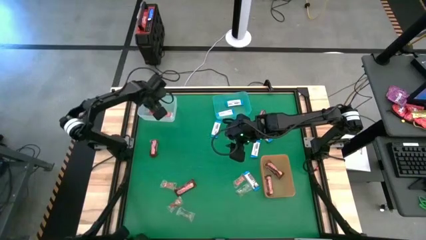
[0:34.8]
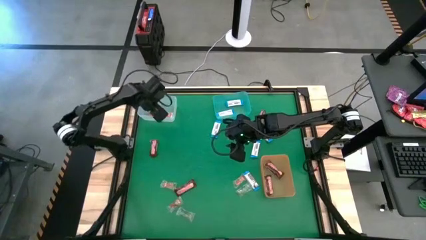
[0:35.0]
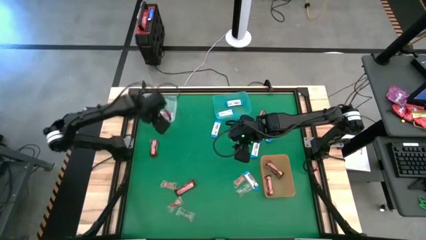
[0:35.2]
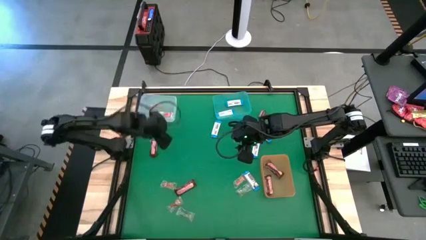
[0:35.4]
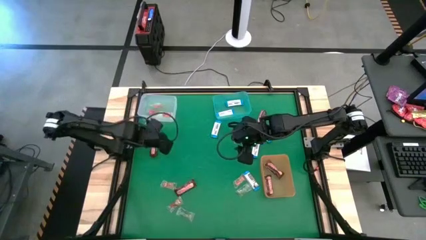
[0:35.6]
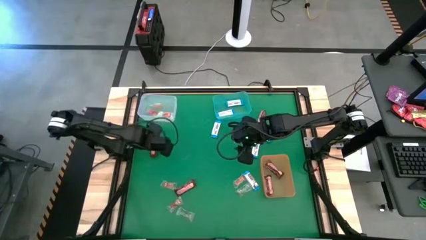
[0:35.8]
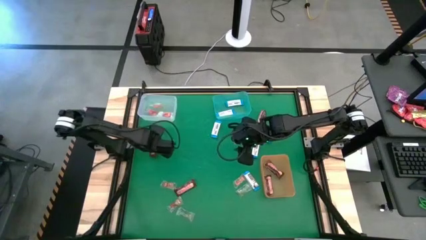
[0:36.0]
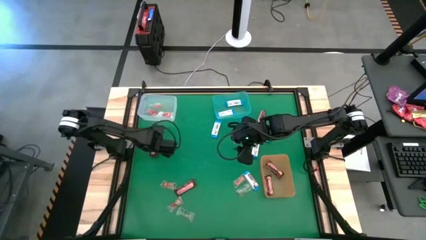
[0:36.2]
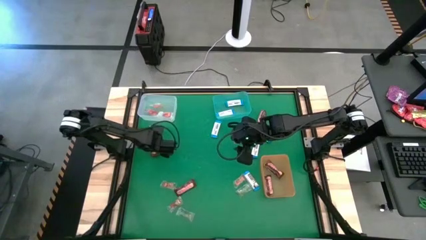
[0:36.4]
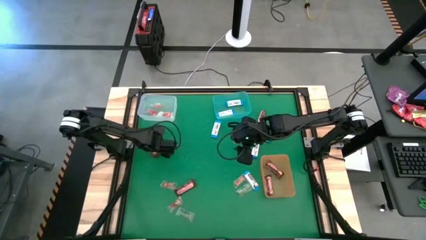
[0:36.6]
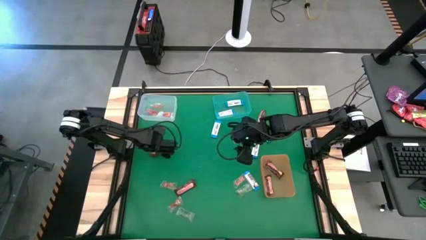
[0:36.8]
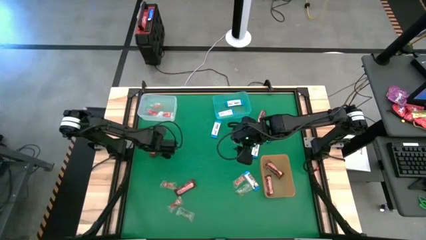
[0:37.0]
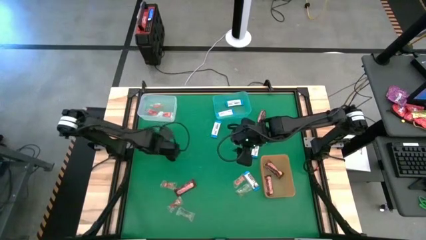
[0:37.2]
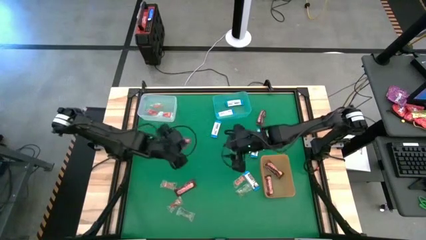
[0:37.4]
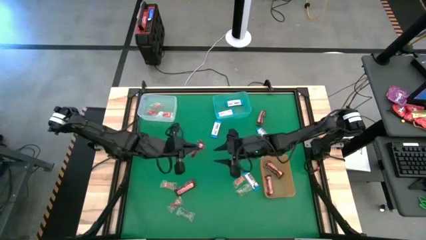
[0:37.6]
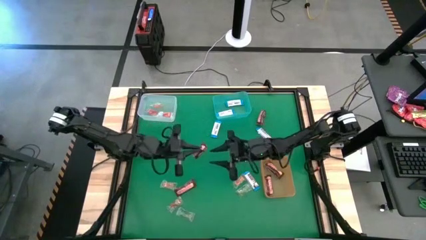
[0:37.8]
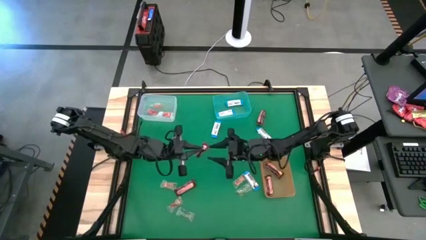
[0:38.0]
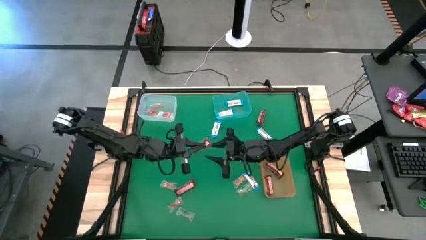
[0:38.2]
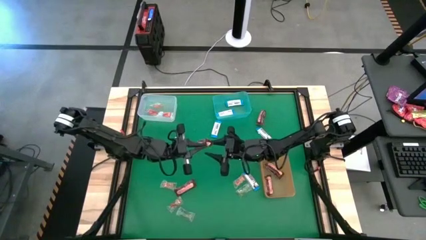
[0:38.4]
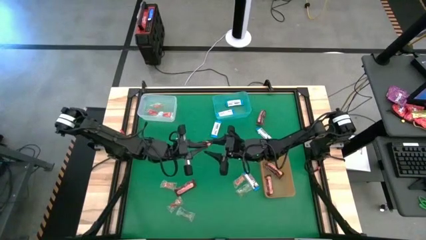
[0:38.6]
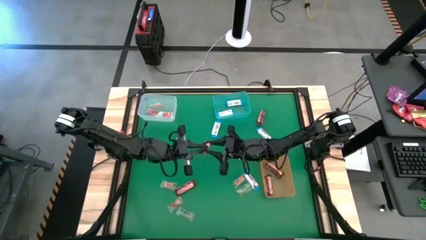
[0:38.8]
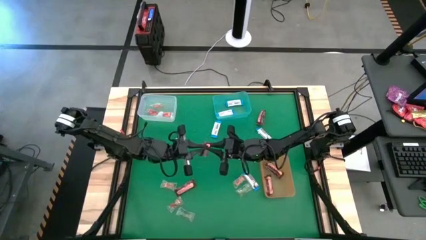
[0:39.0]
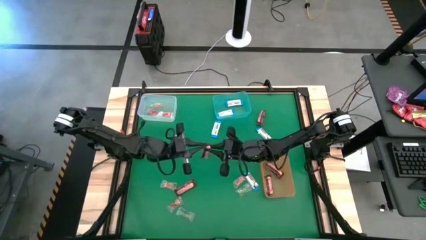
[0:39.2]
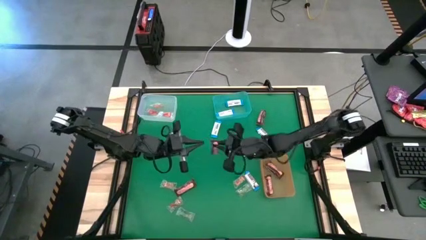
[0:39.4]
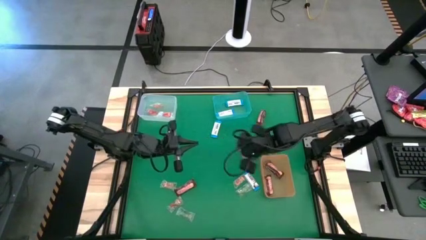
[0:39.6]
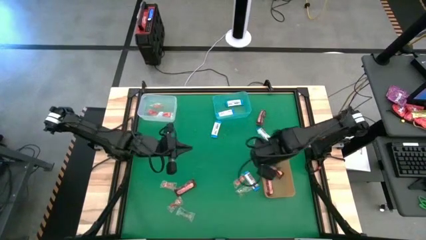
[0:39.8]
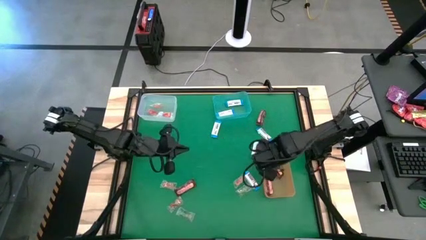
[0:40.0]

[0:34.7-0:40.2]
Task: Sort candy by brand, put in halloween buckets
Put the brown chocolate into the orange bin

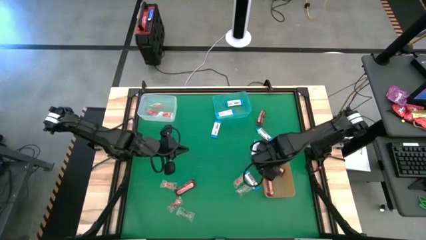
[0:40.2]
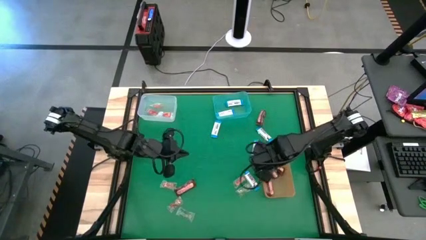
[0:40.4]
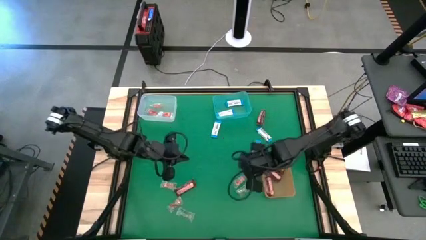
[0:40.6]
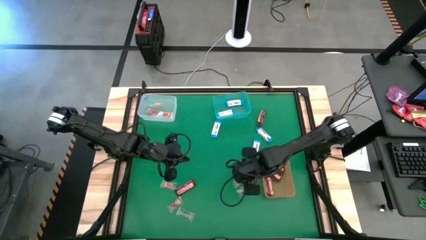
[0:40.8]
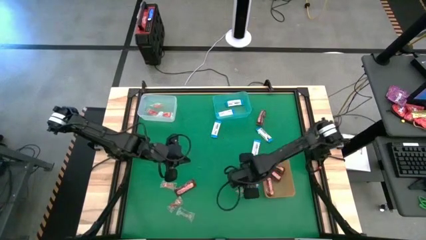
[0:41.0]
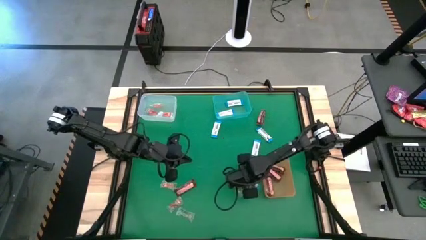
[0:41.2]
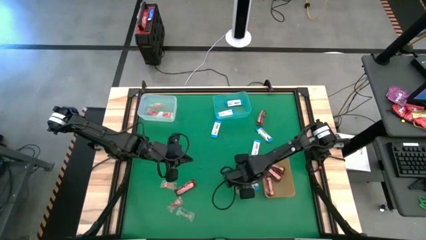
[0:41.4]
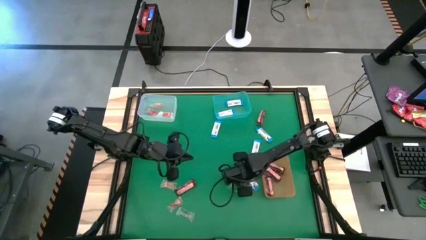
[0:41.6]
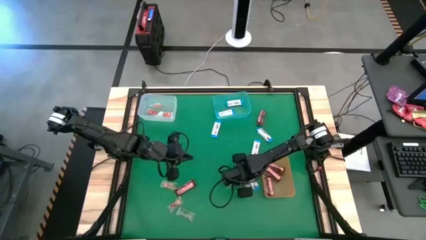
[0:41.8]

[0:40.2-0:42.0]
Put the orange gummy into the white bin

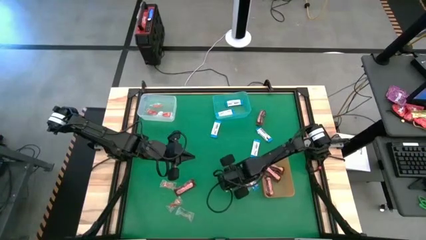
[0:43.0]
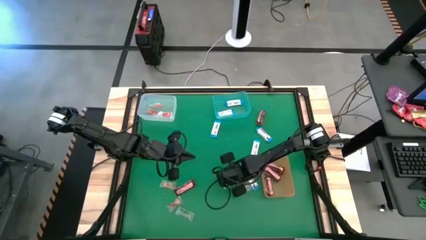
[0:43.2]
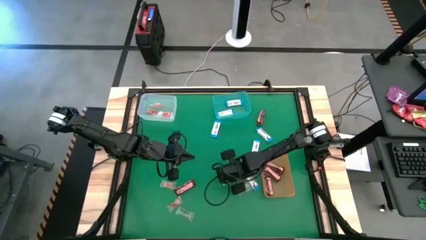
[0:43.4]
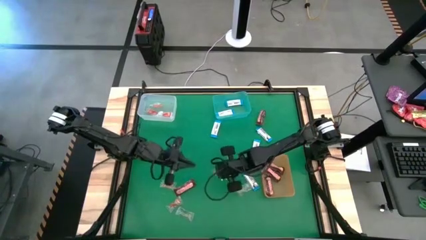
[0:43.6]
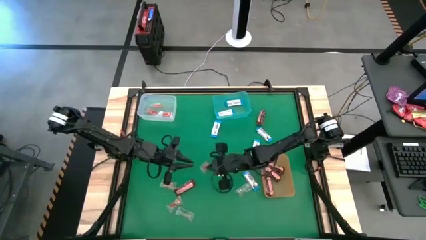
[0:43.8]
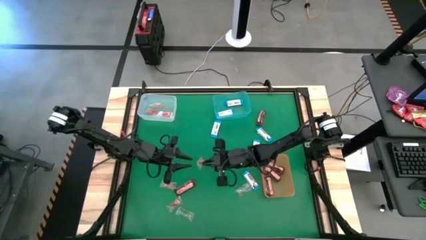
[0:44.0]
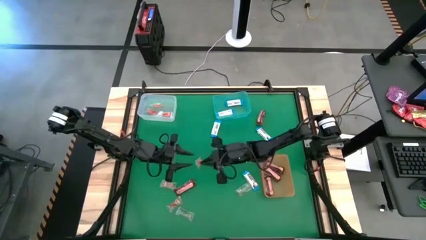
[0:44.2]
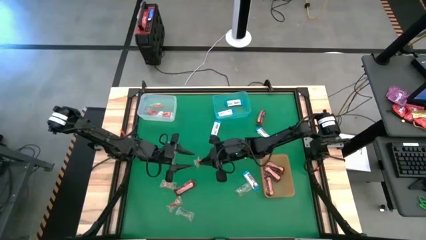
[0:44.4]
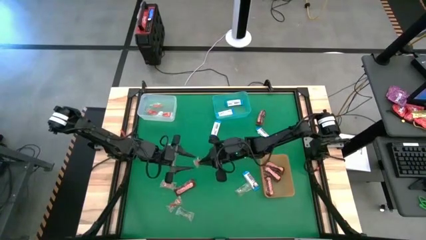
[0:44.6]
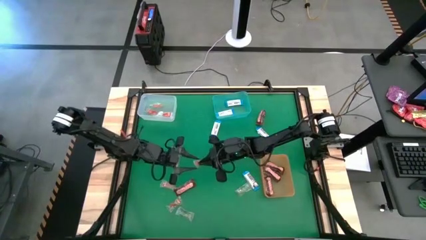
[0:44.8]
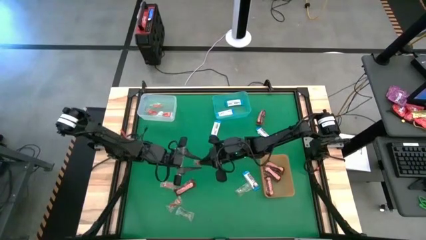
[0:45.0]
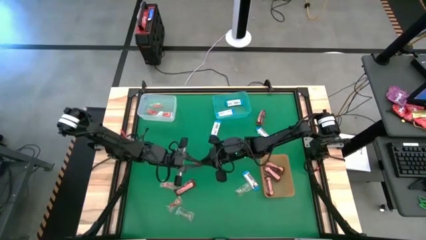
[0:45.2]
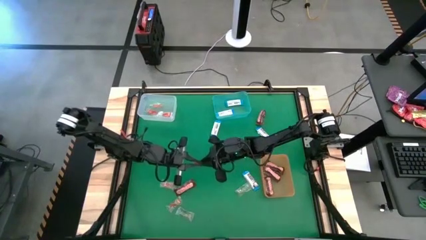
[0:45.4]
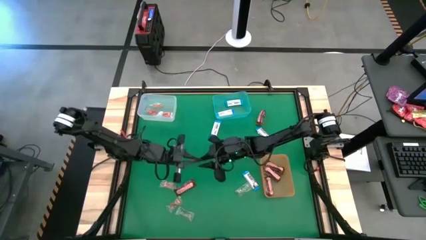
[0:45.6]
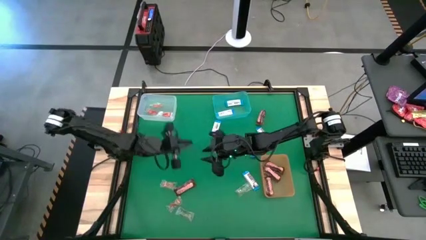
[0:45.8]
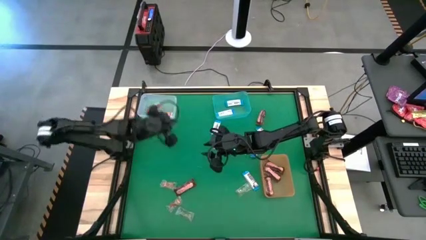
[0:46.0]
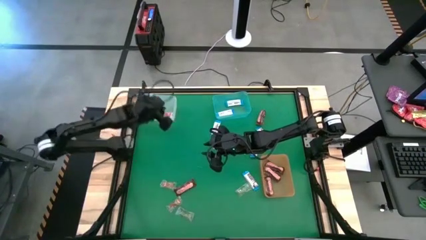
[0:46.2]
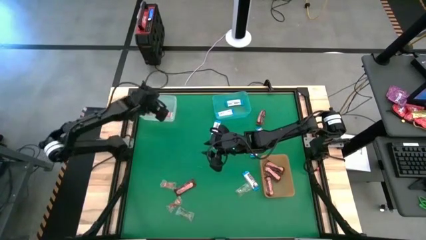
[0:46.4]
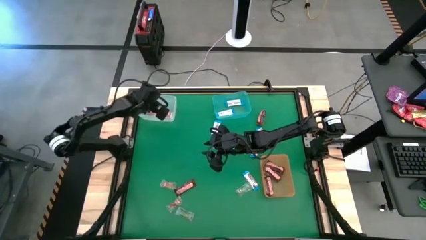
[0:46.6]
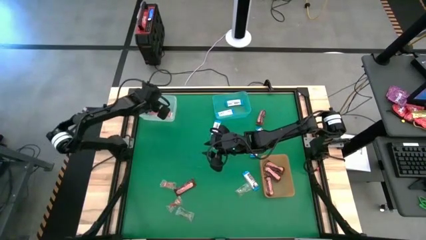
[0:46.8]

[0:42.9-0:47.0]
Put the orange gummy into the white bin

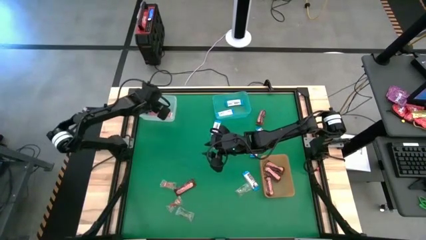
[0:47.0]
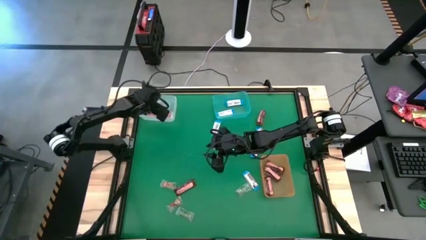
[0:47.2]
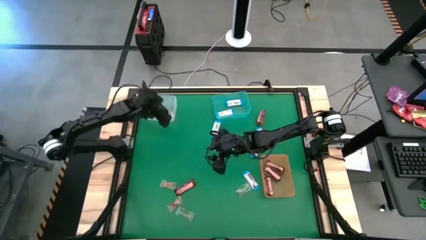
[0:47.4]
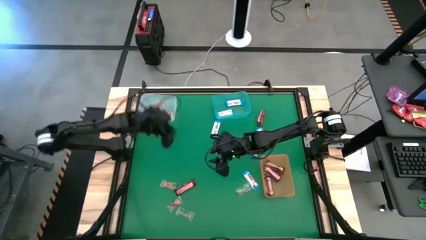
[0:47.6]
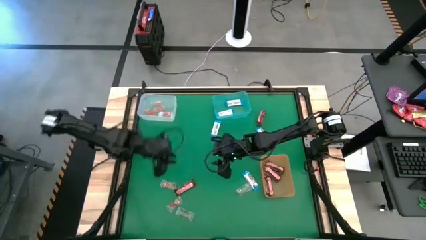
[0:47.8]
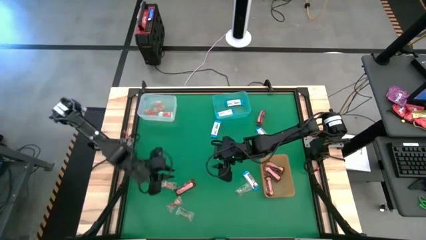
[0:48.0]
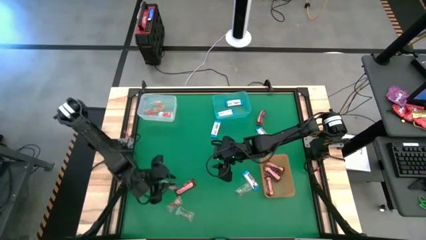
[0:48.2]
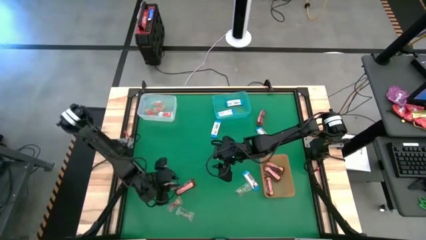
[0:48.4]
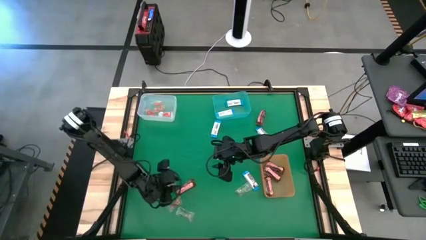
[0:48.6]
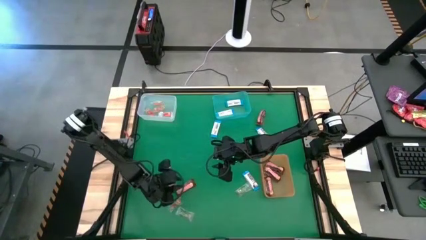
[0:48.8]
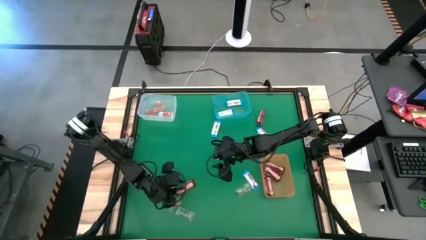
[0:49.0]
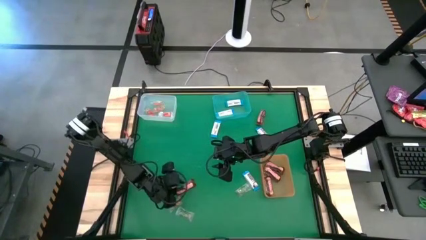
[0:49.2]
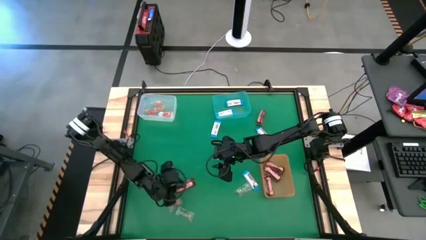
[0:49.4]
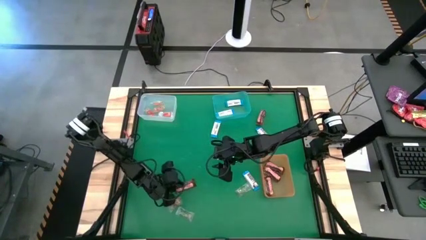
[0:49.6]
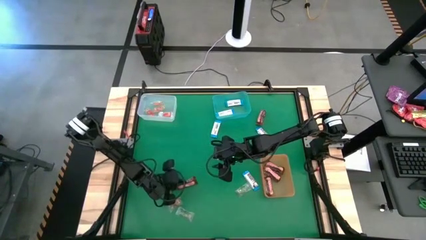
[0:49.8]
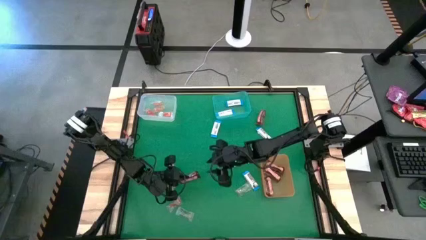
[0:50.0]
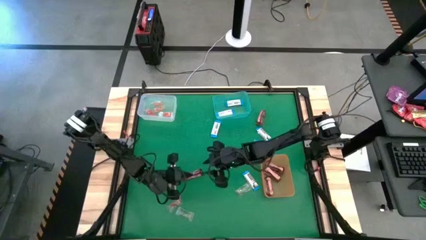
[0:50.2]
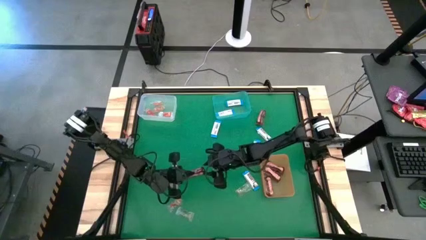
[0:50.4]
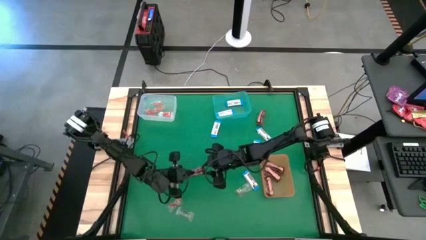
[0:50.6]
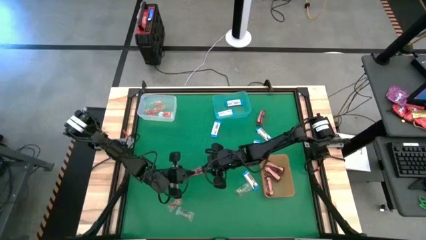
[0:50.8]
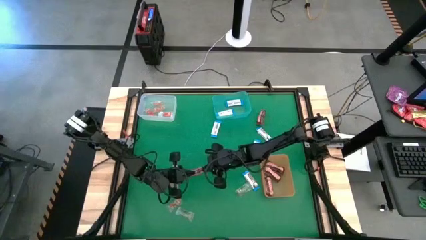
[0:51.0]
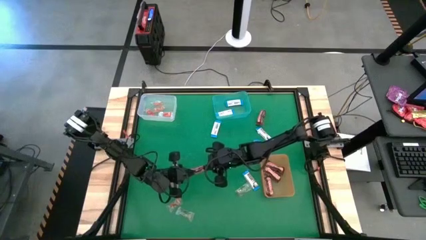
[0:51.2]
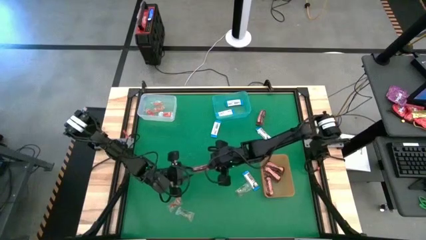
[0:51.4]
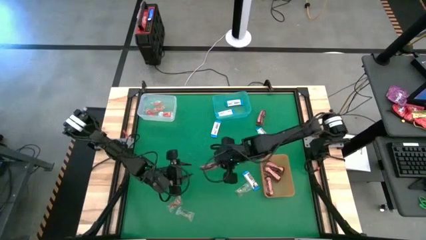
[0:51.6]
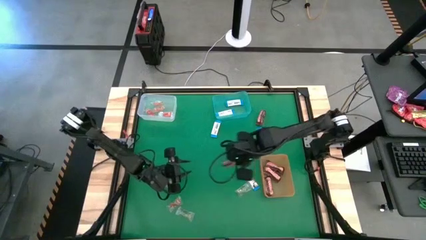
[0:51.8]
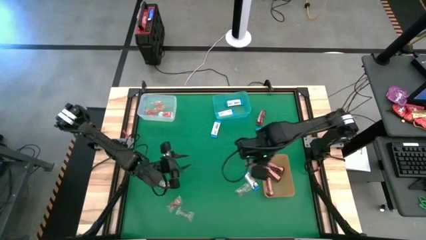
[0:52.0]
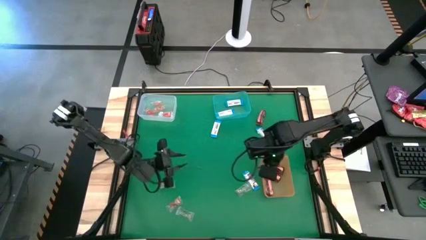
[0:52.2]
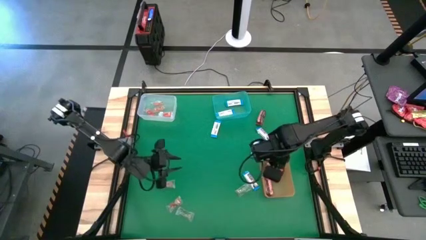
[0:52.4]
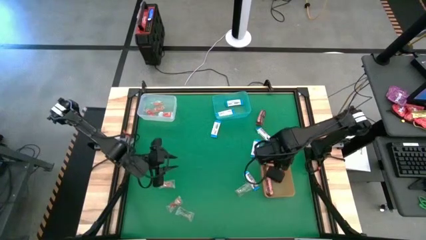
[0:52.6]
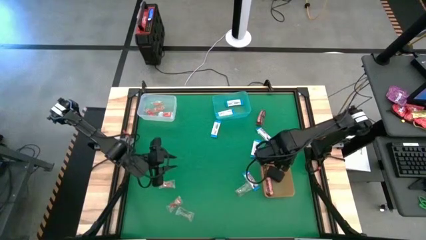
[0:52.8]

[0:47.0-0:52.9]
Put the brown chocolate into the orange bin
